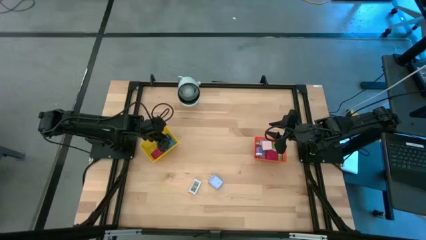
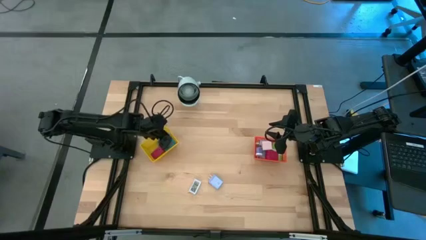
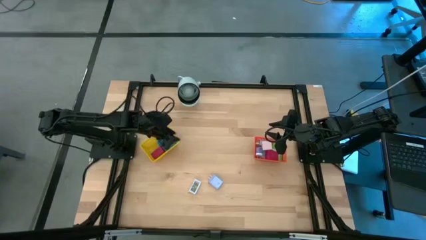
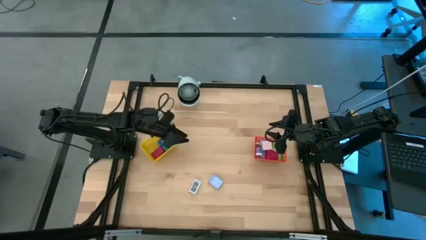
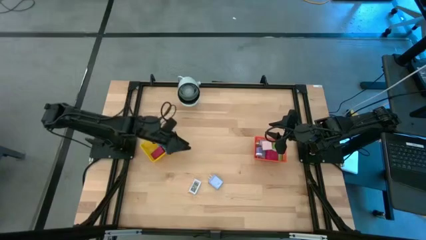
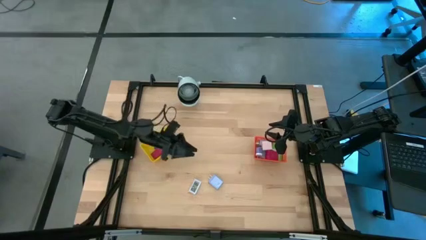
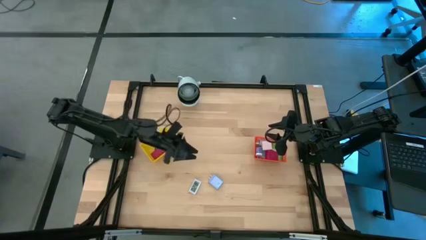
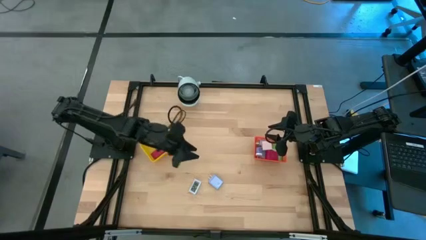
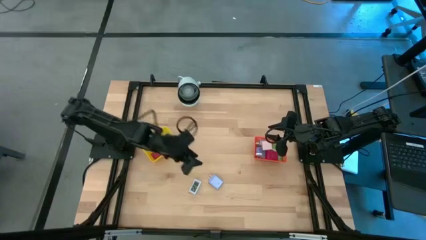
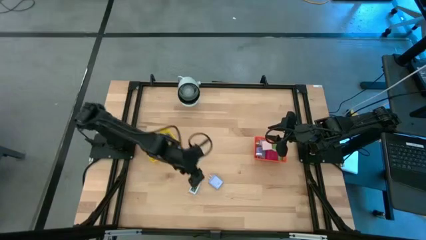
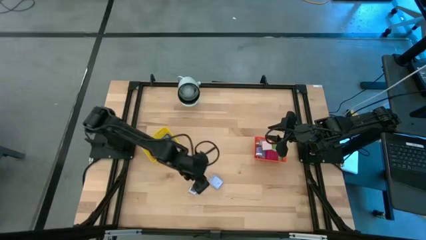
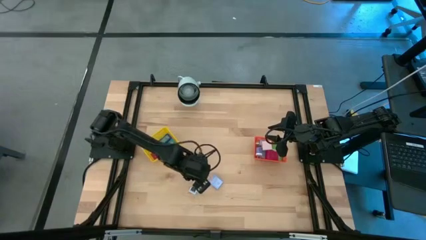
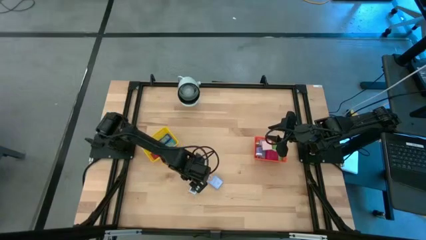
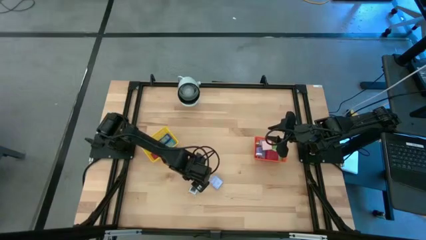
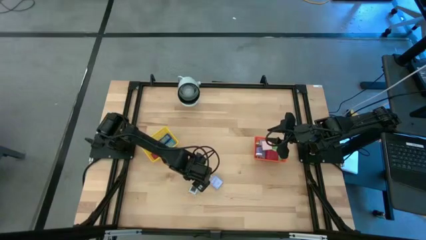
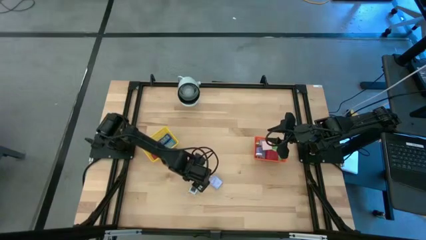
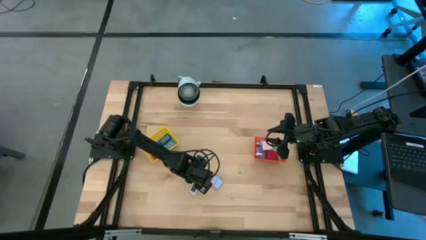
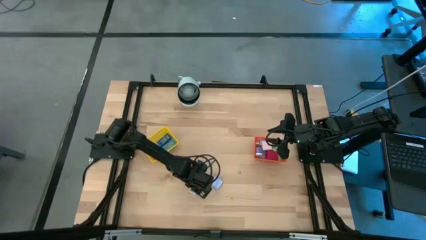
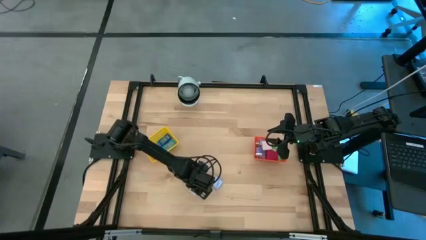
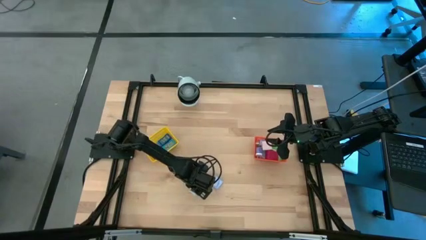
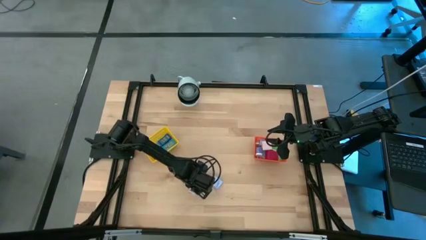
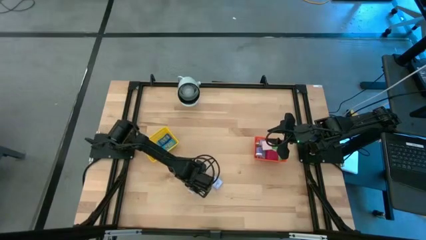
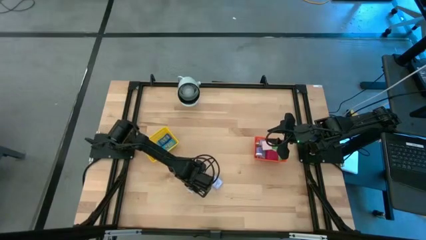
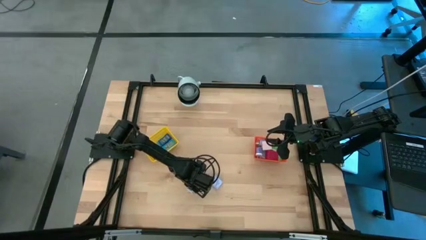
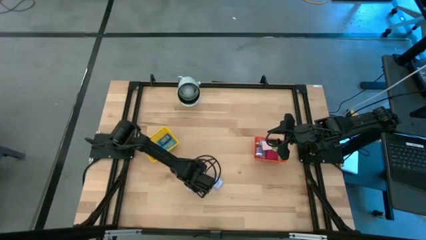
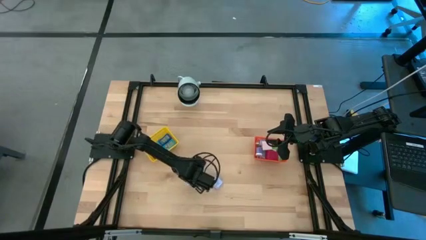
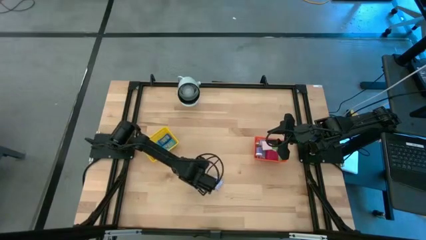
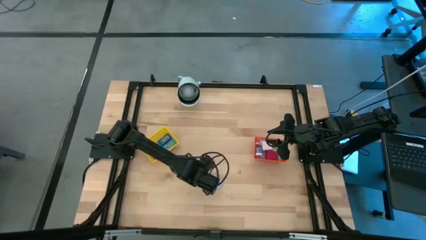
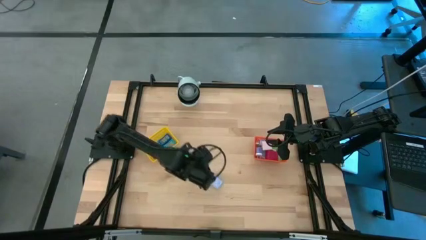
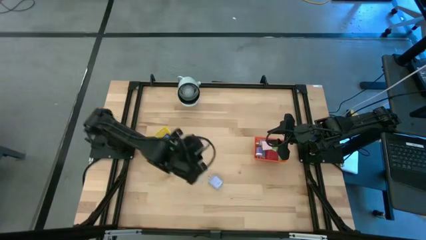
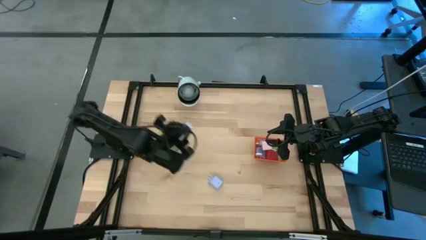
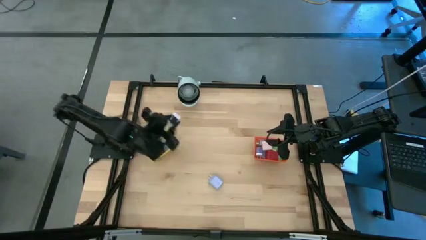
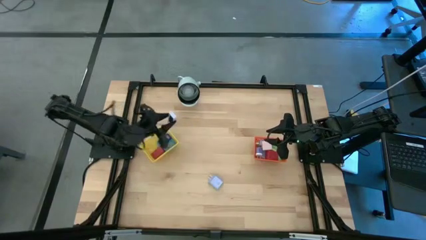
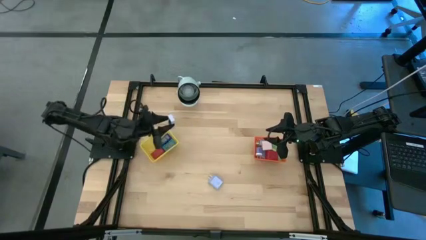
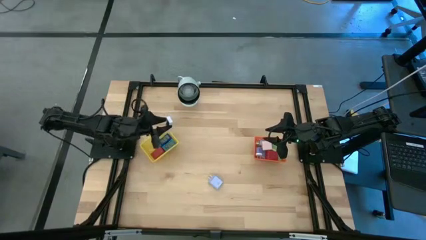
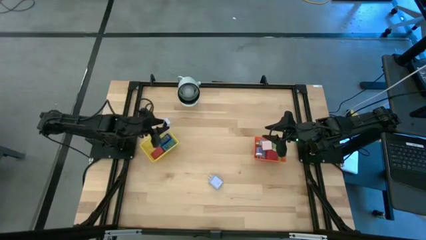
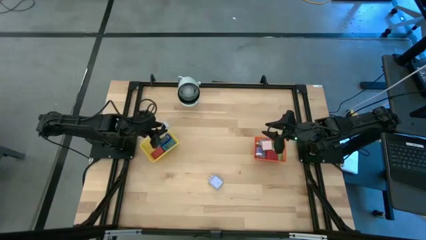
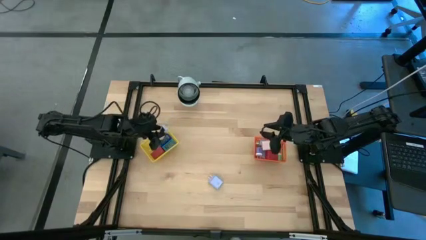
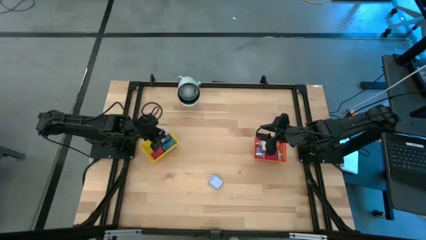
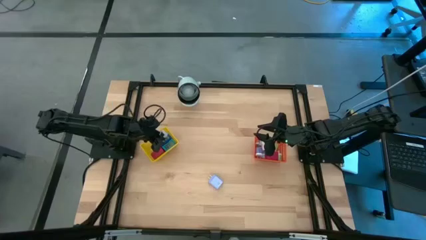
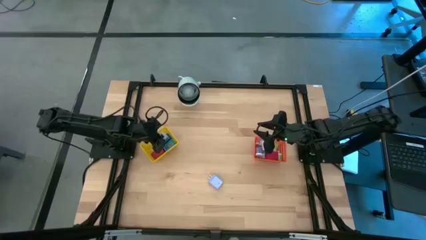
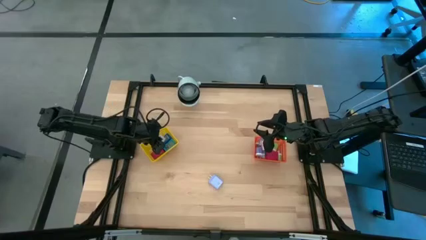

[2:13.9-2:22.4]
Task: Pick & Place Office items
Put the white digital timer into the yellow basket

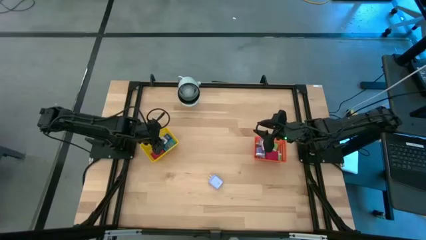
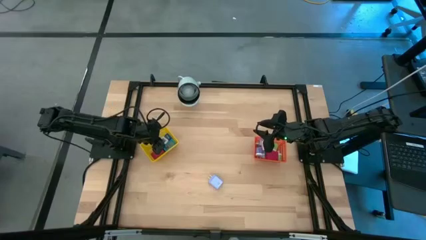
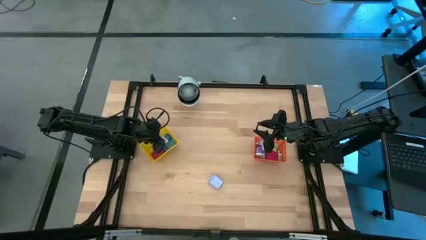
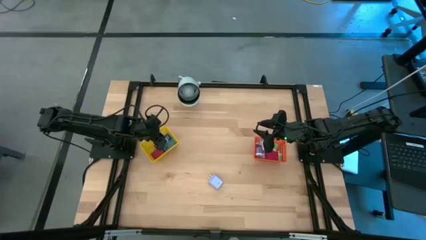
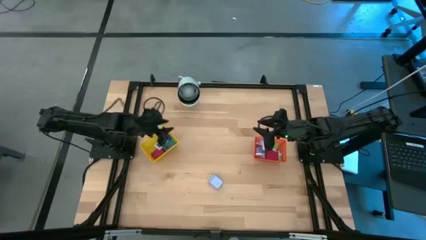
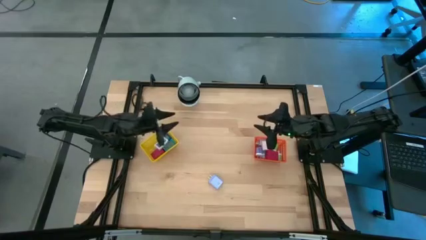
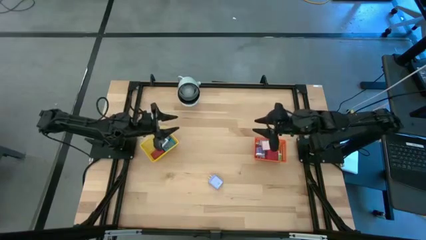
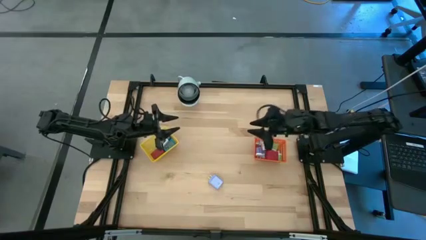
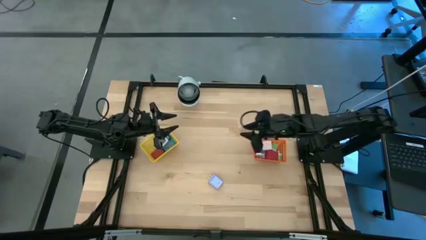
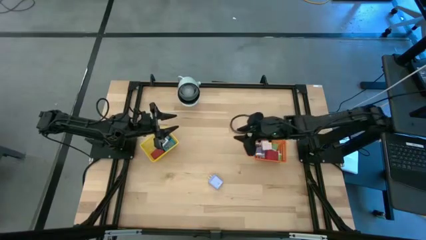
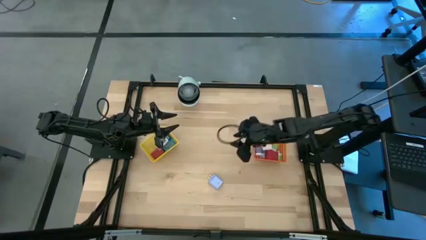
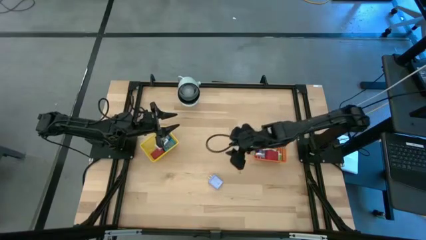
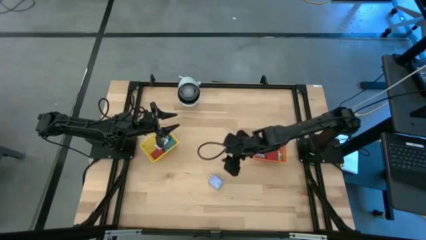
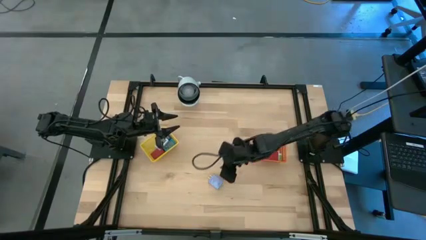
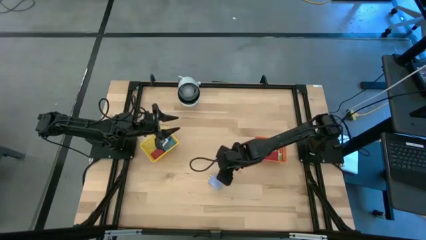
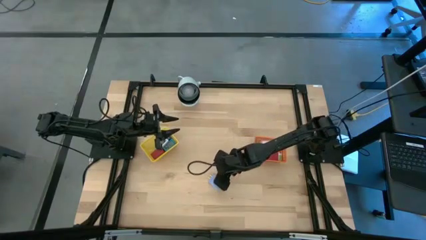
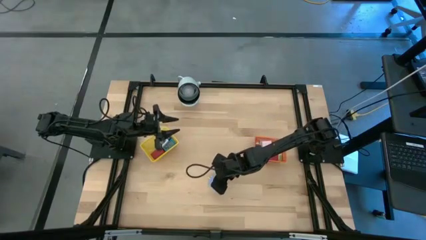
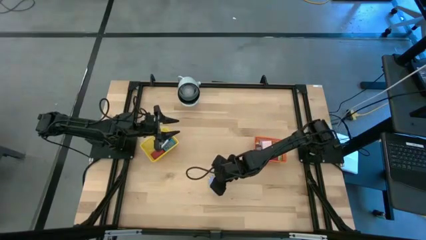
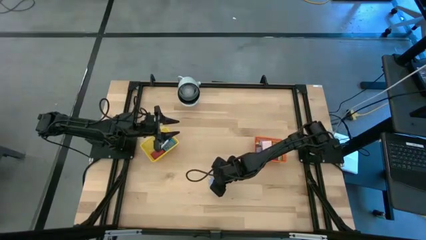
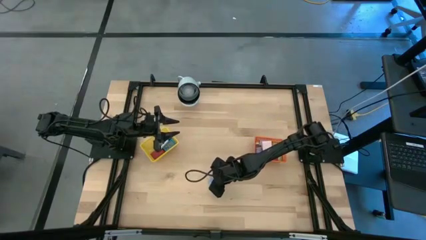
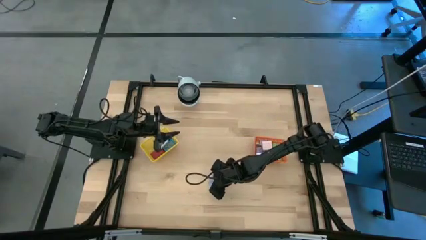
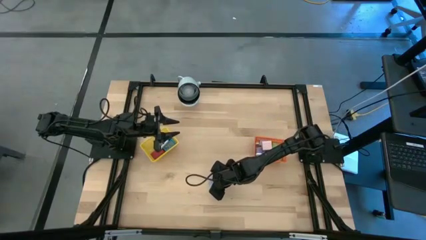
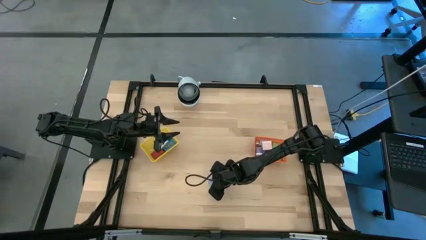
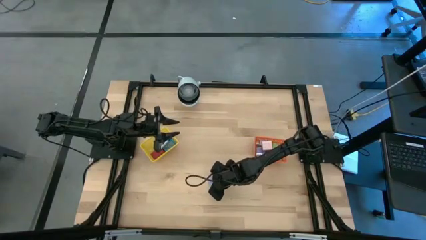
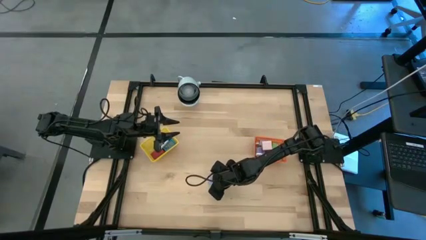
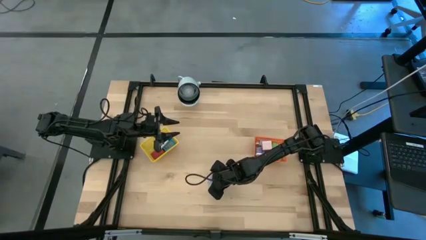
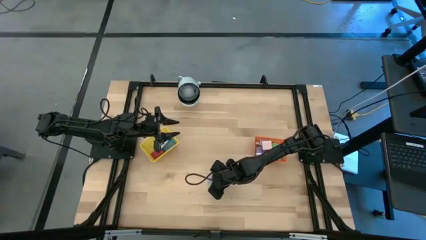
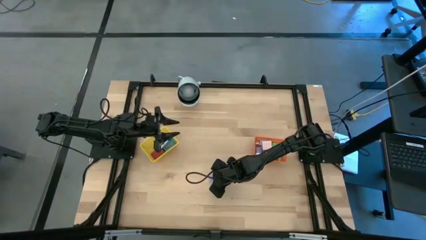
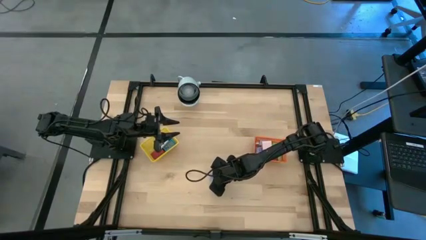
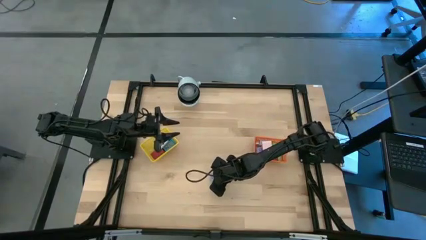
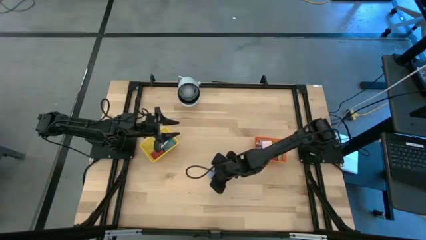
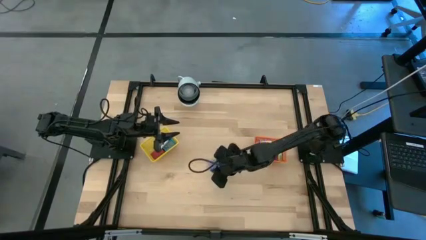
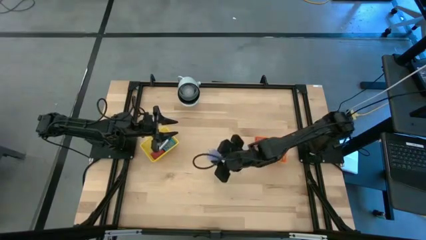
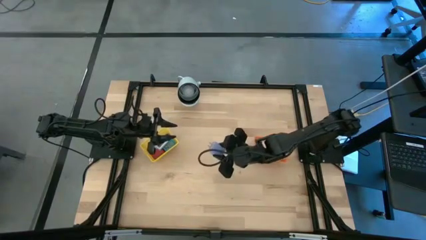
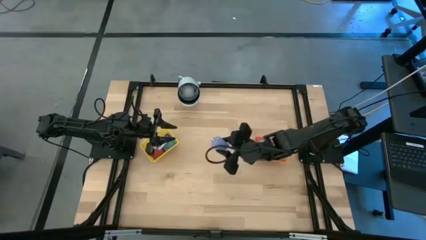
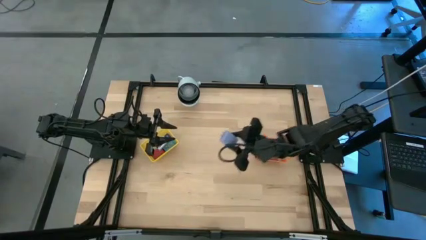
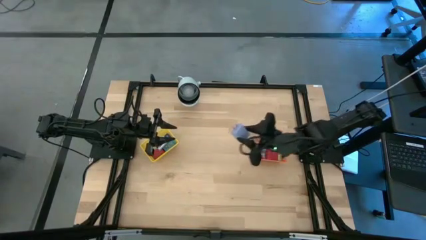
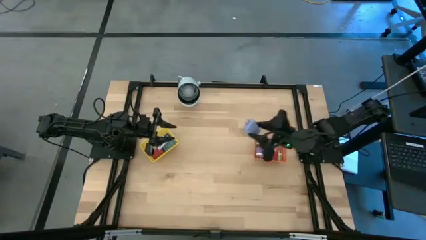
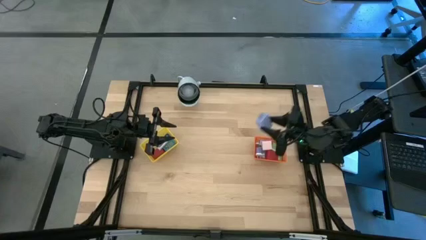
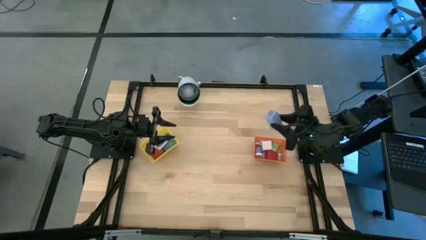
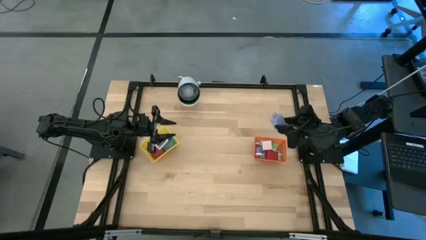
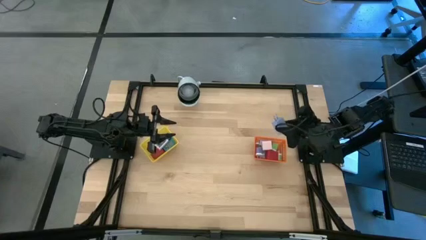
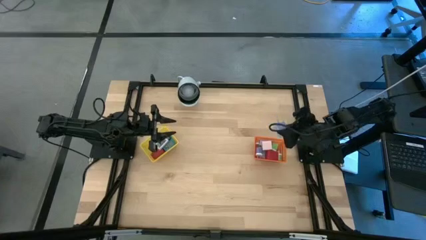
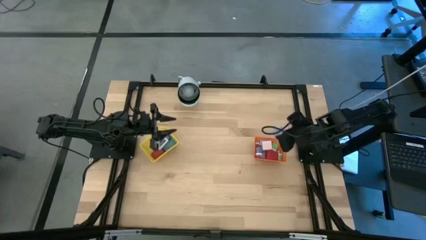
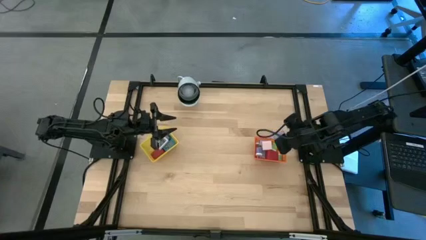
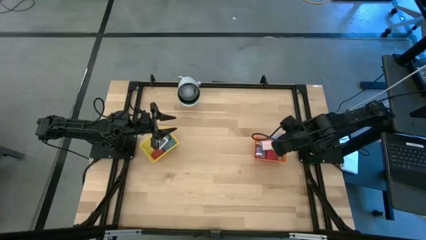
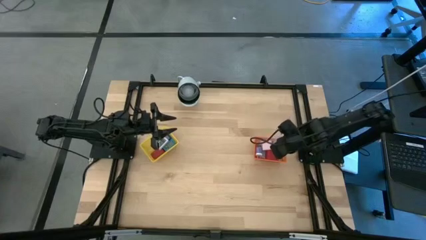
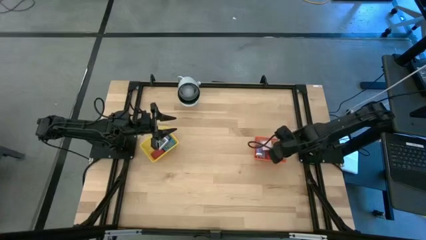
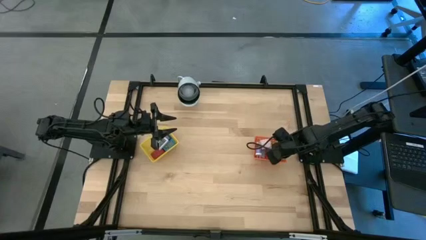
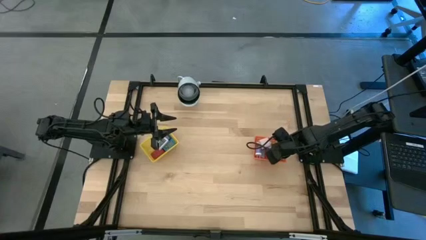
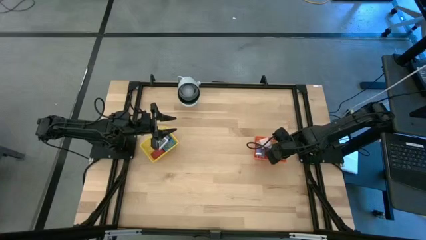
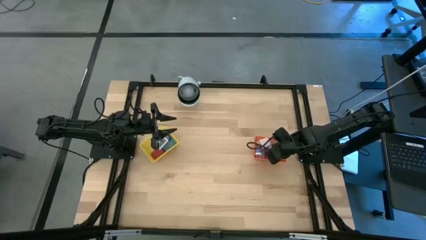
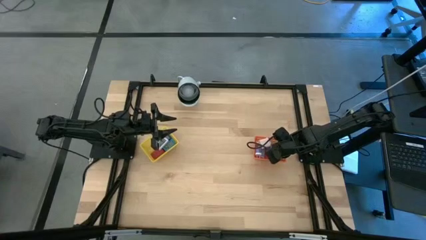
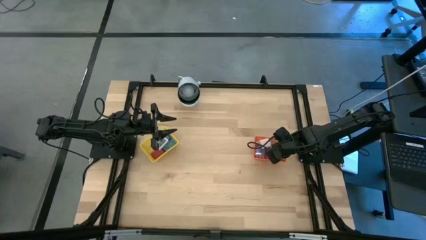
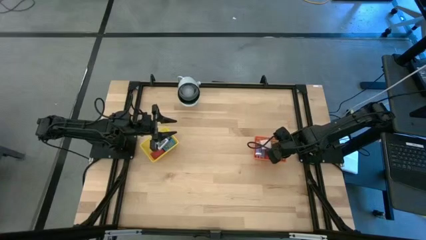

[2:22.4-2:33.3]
Put the blue charger adapter into the orange basket
